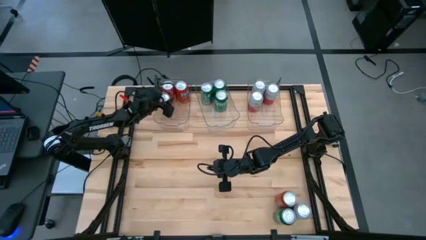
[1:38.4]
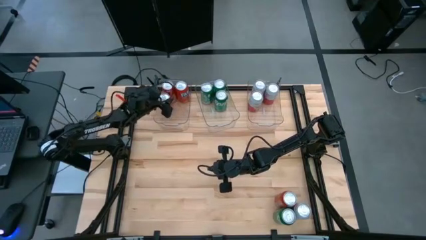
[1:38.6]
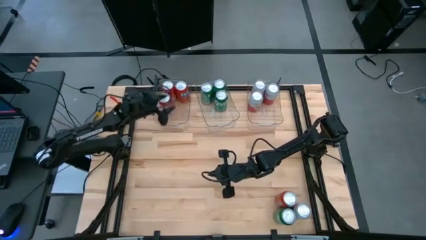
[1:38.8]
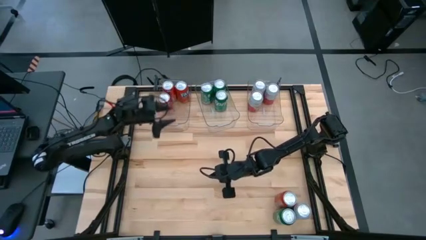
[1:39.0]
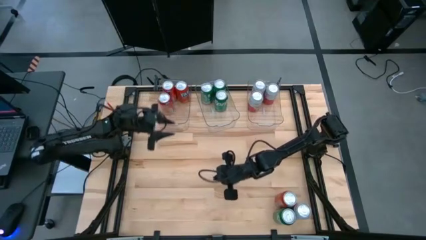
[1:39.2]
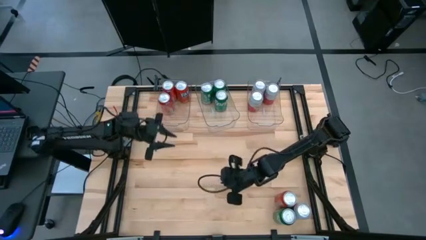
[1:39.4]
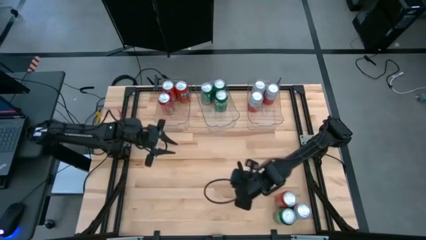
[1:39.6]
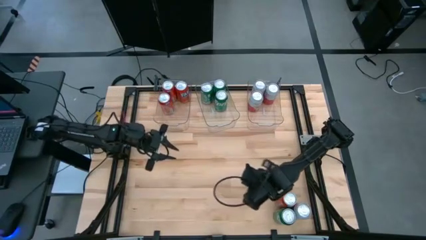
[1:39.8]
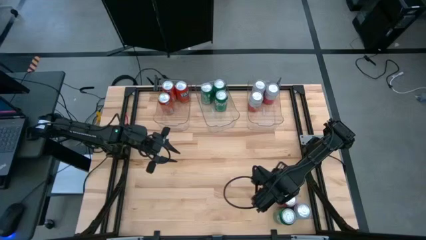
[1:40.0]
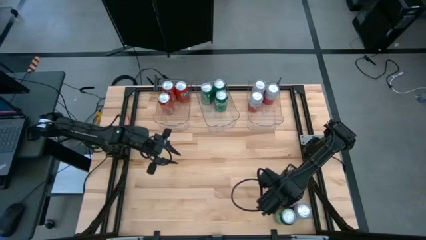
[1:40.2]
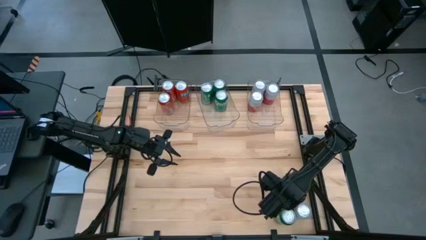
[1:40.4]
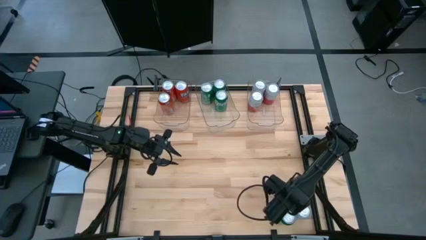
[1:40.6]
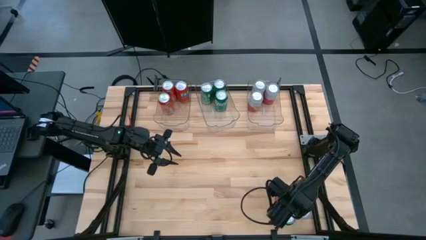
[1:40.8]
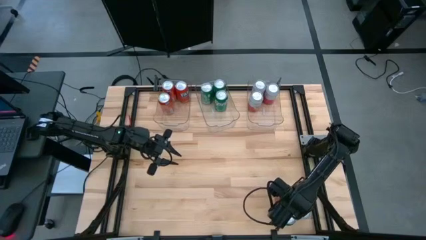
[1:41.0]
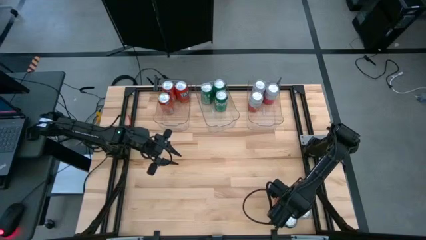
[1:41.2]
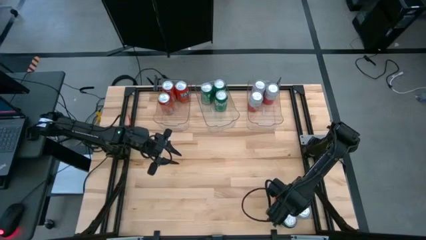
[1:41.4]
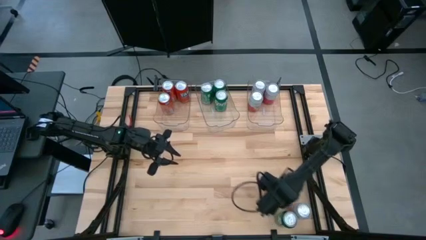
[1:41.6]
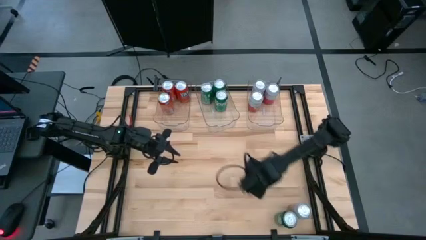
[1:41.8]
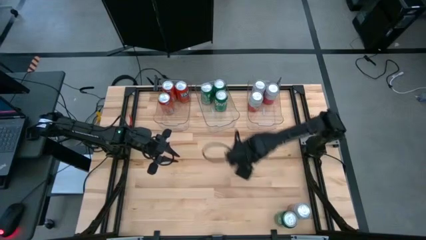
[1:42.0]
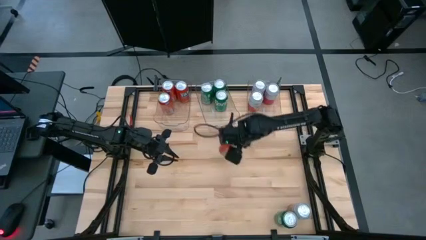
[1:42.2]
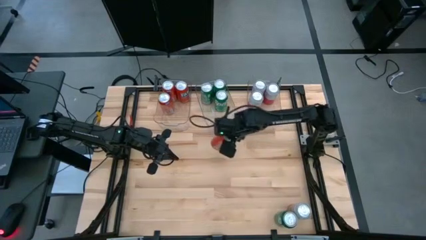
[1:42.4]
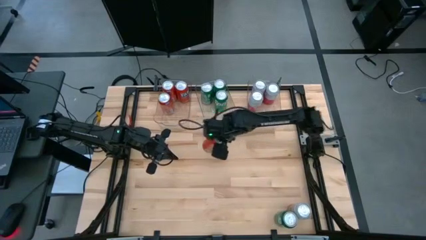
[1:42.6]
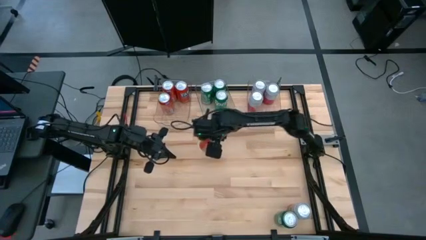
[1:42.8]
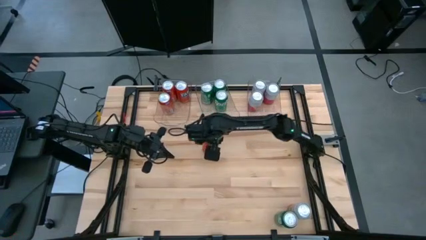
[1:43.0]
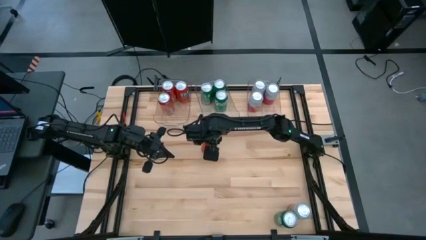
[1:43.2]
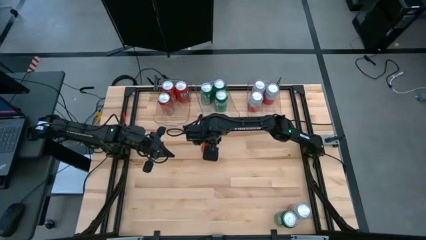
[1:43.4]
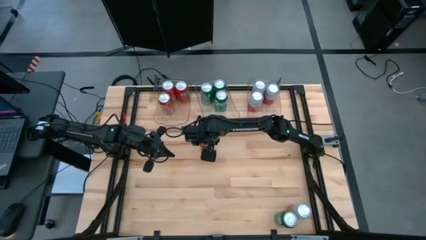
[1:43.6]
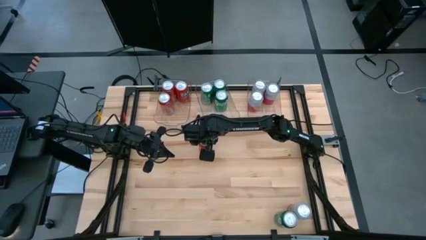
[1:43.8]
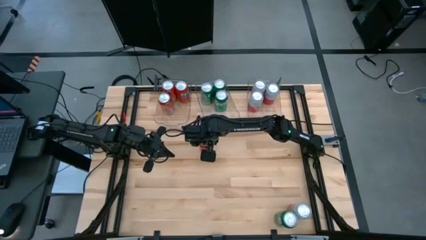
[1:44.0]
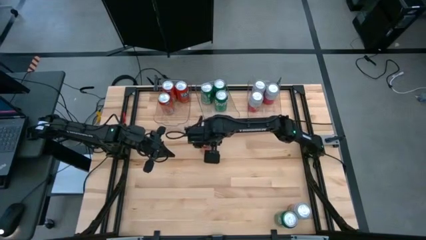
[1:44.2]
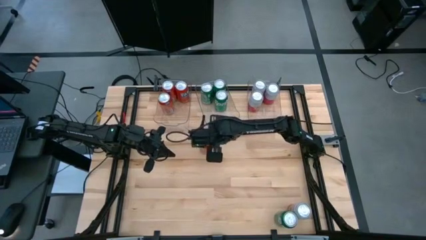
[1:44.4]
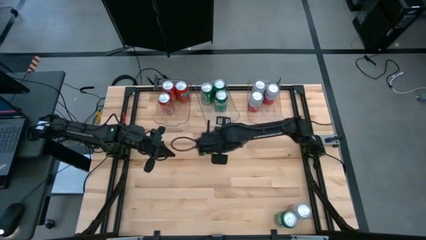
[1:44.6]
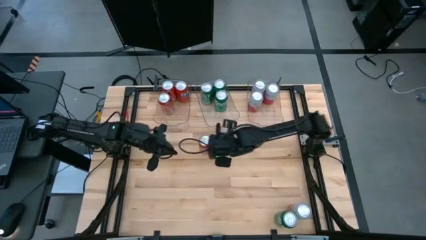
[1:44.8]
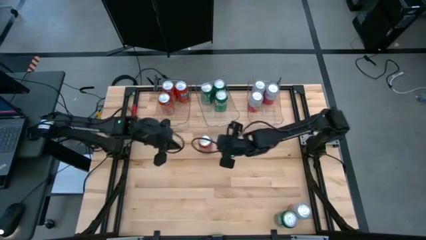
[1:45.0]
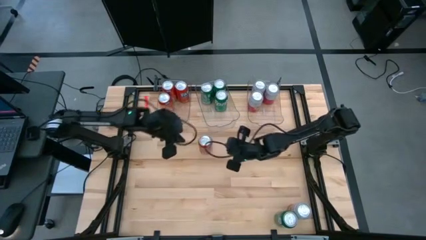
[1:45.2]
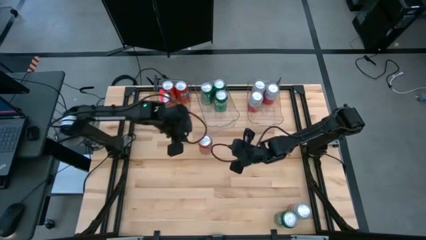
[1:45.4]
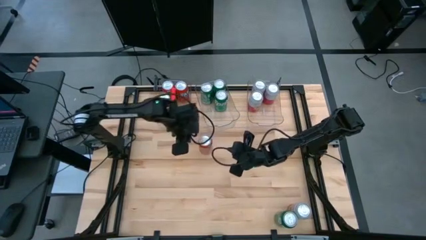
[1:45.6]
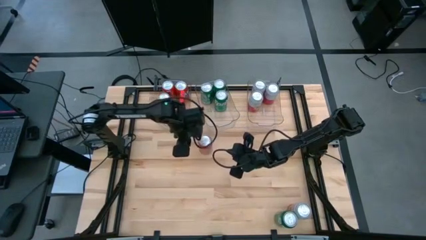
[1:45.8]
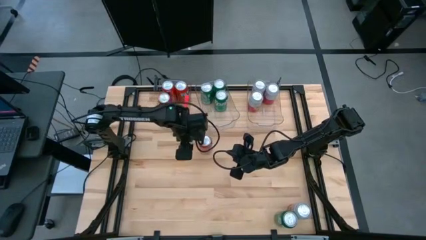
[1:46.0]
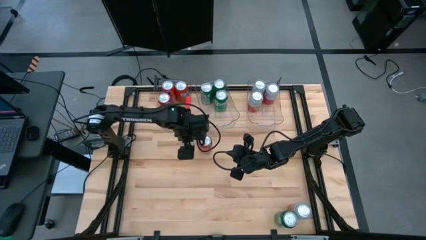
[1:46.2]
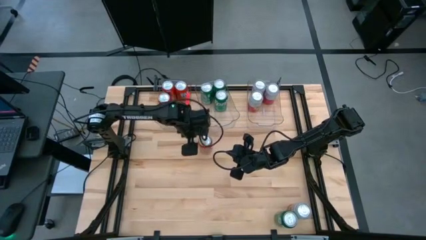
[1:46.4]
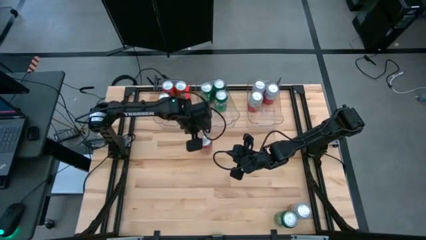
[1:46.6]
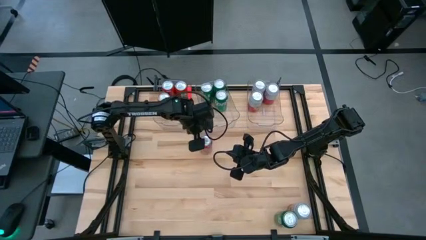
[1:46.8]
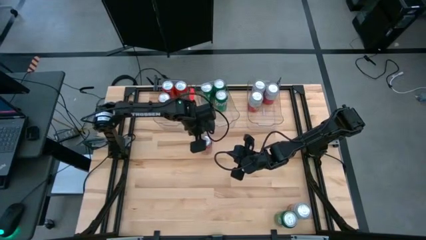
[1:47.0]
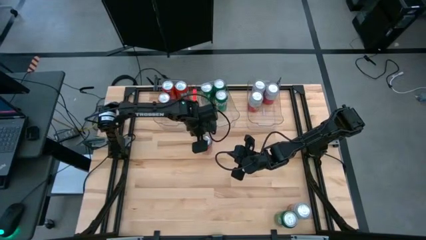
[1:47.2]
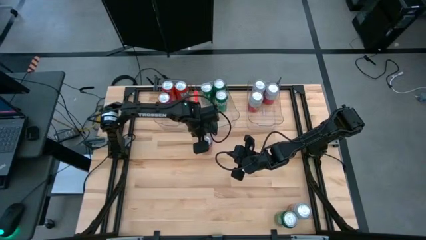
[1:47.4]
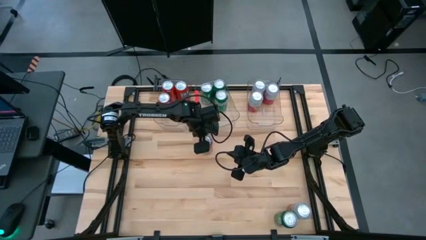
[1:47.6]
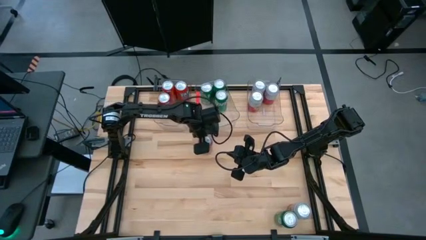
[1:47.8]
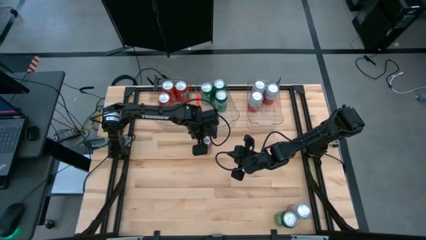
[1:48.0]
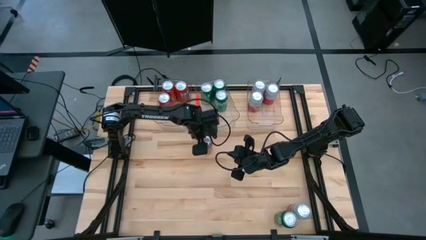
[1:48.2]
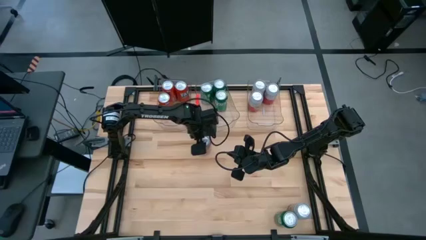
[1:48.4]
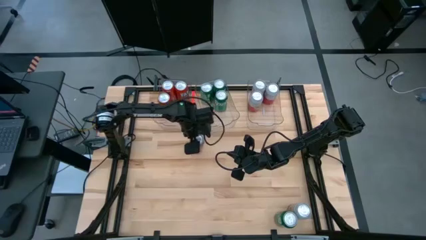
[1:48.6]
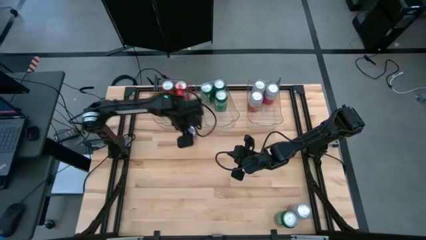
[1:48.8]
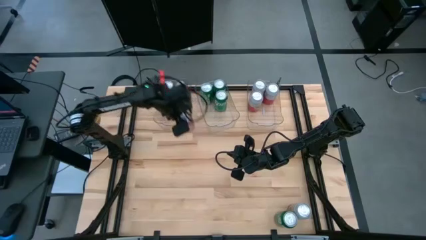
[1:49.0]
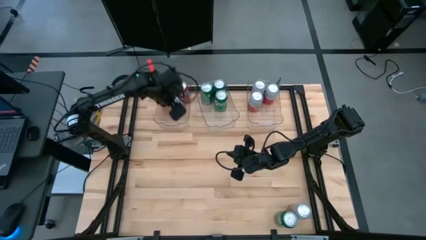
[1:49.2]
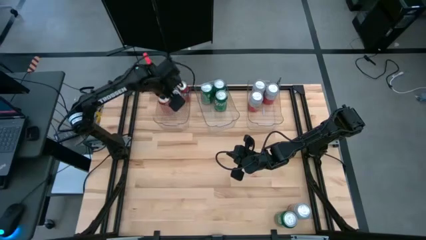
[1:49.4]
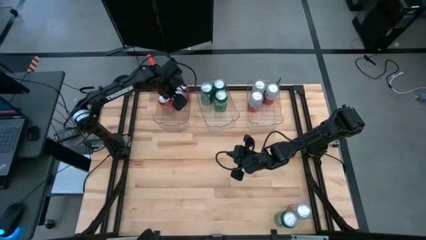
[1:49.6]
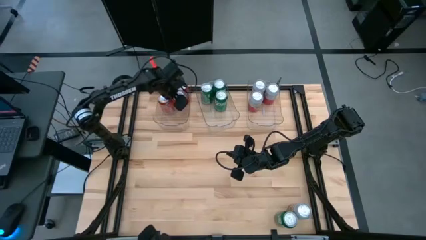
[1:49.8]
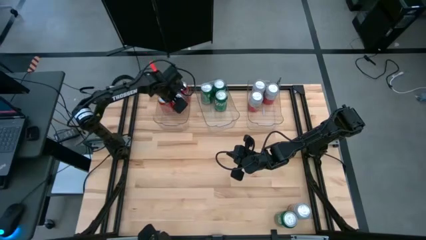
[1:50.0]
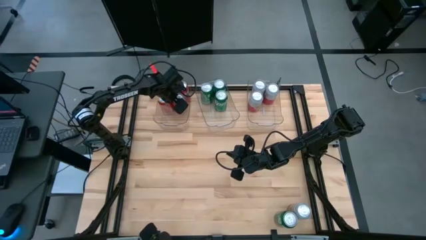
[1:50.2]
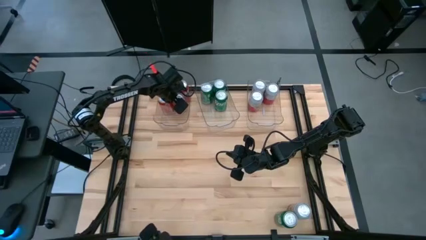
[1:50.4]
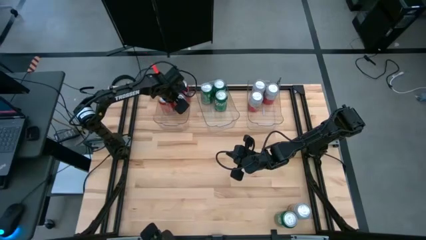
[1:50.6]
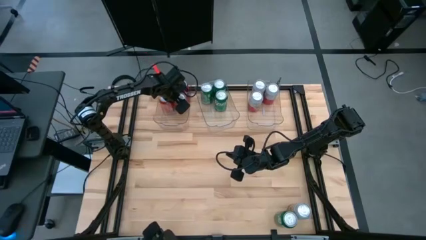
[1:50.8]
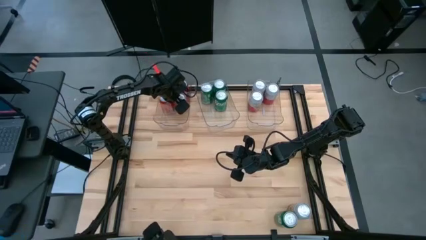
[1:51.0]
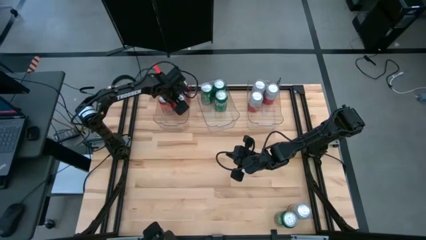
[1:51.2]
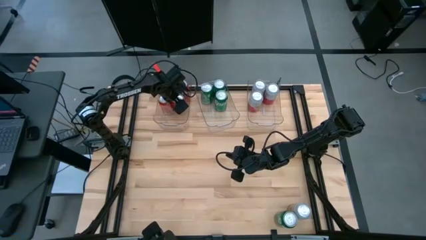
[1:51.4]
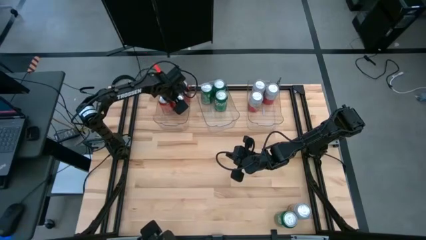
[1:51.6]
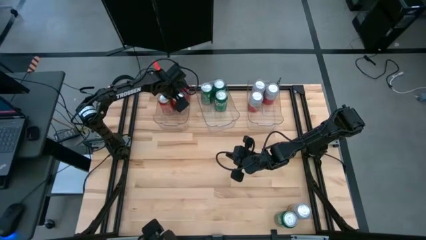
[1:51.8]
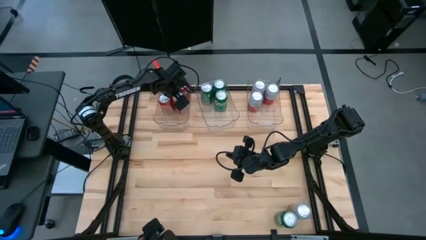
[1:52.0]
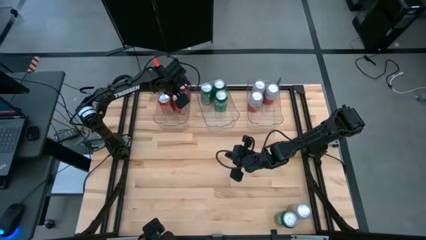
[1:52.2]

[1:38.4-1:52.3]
Task: Sort soda cans
Put the red soda can into the left transparent bin
